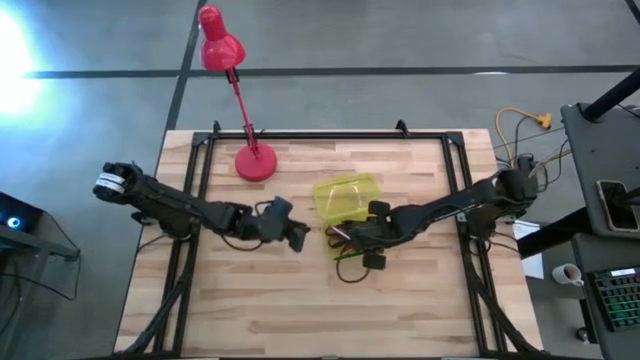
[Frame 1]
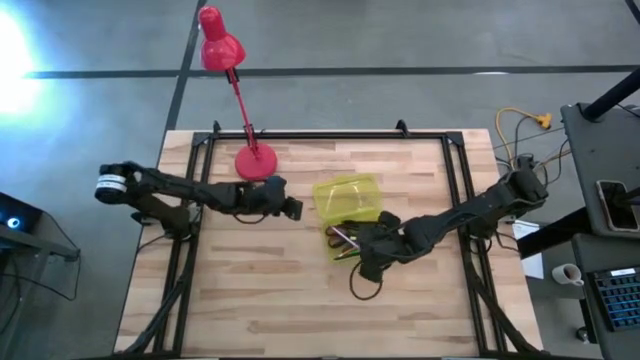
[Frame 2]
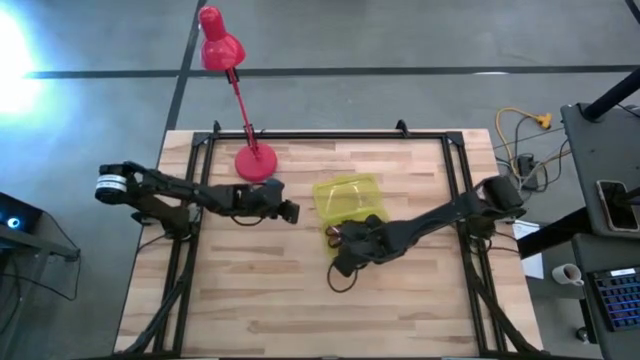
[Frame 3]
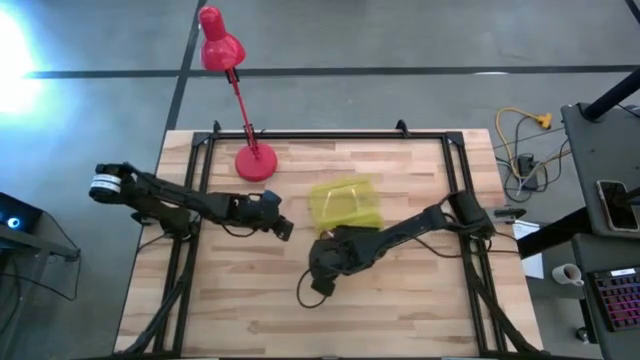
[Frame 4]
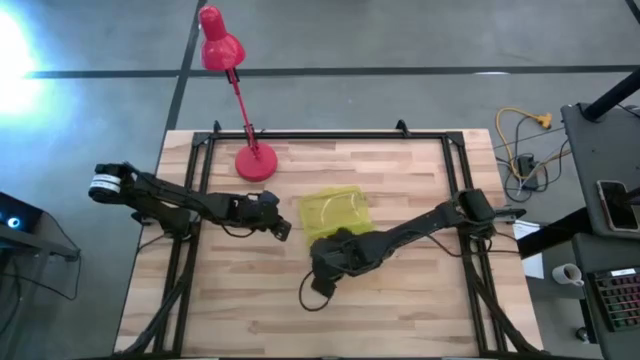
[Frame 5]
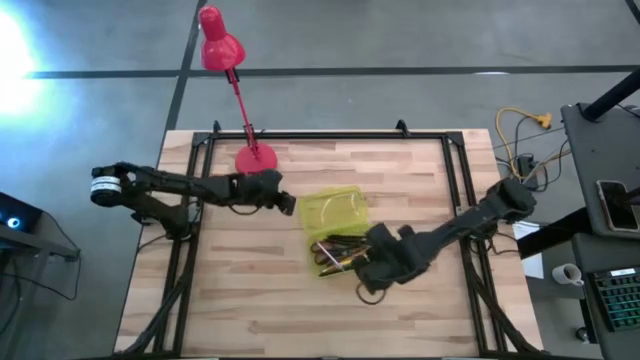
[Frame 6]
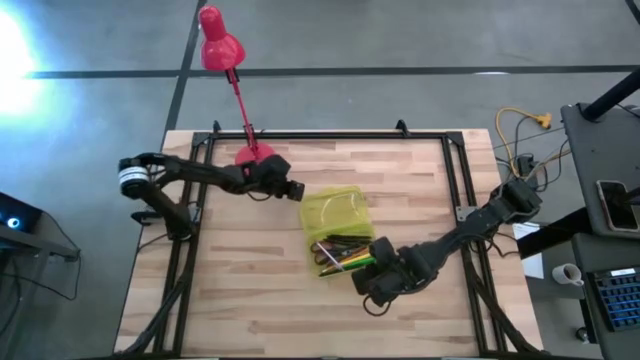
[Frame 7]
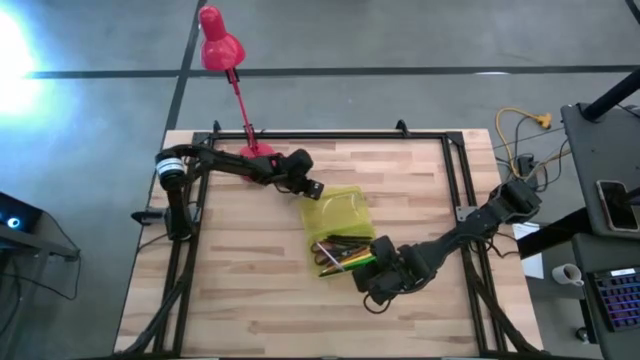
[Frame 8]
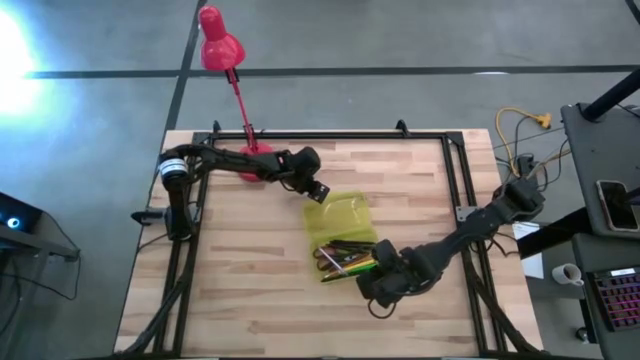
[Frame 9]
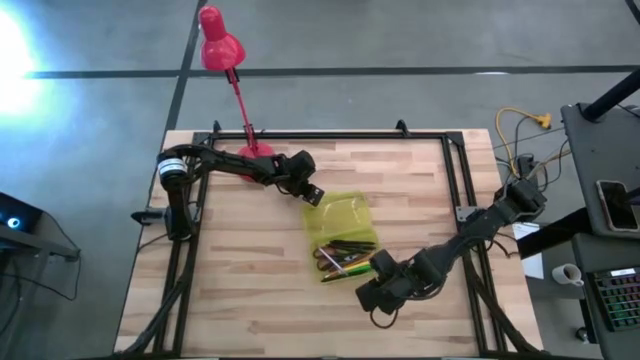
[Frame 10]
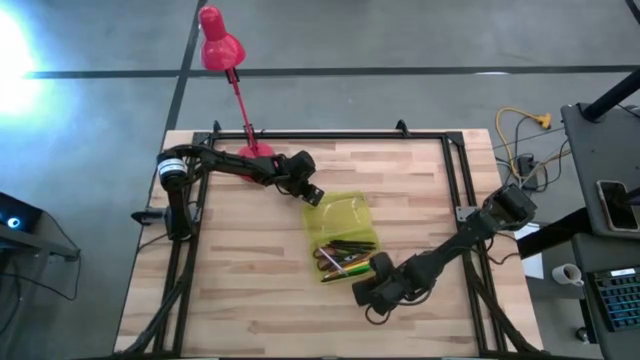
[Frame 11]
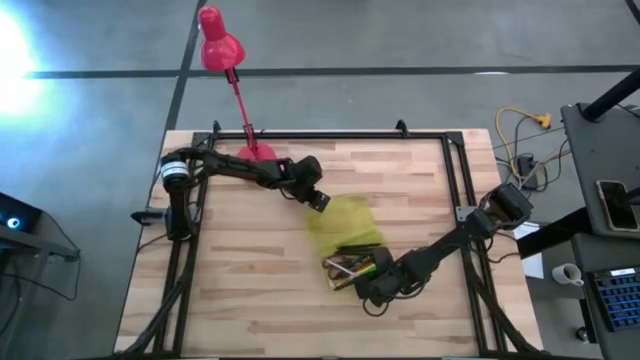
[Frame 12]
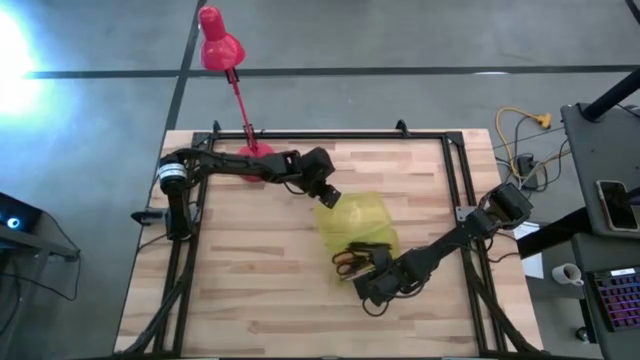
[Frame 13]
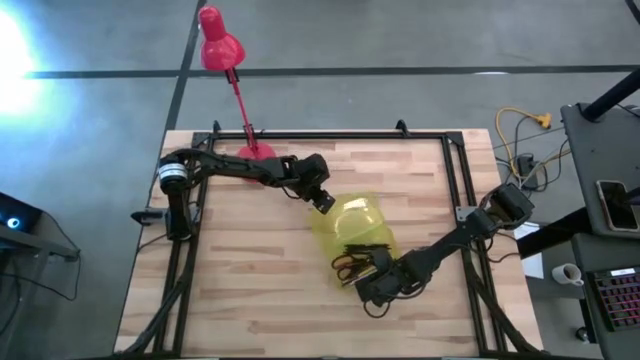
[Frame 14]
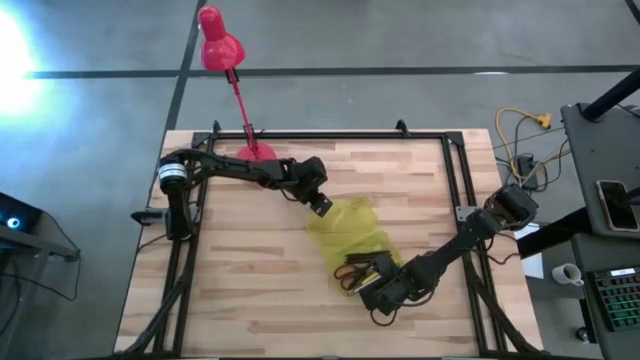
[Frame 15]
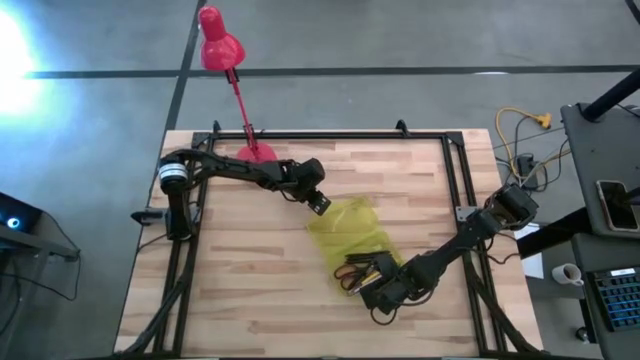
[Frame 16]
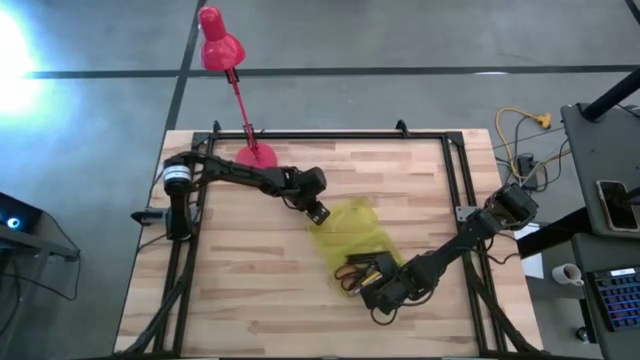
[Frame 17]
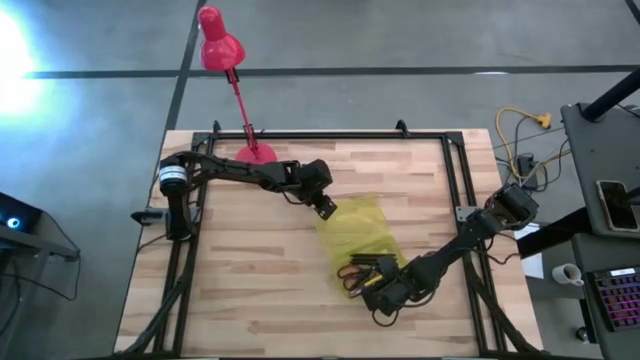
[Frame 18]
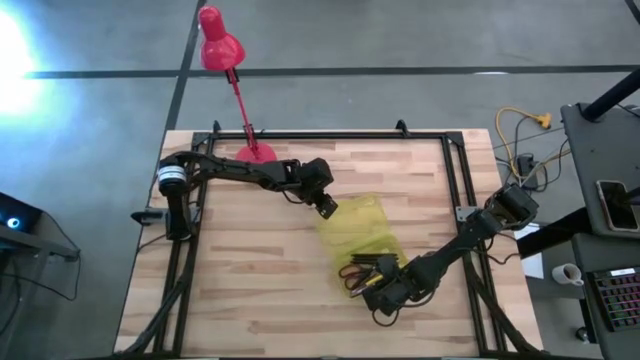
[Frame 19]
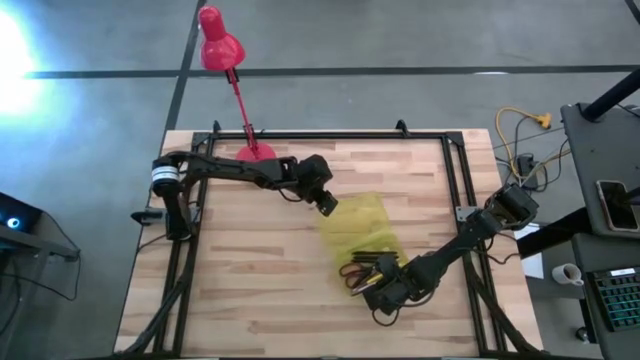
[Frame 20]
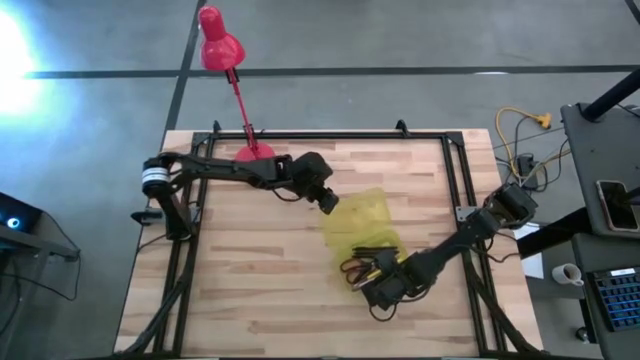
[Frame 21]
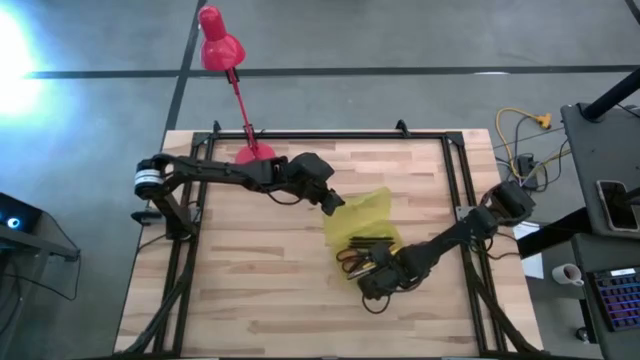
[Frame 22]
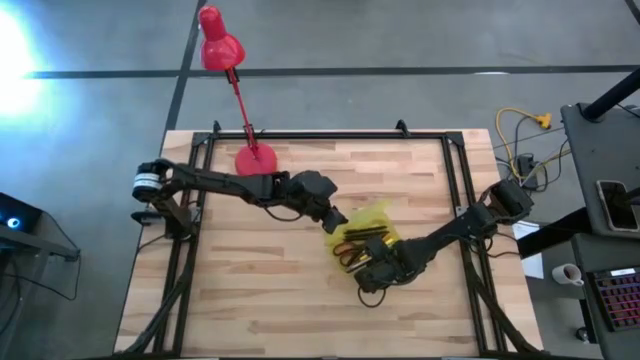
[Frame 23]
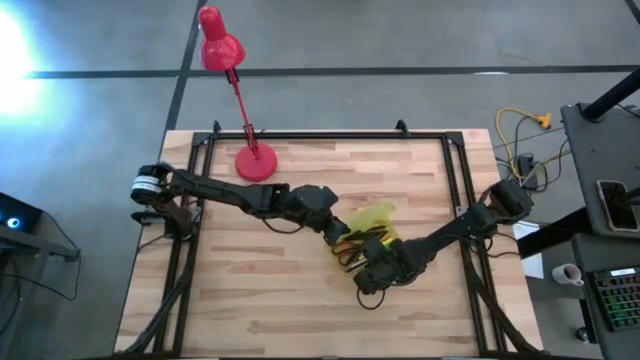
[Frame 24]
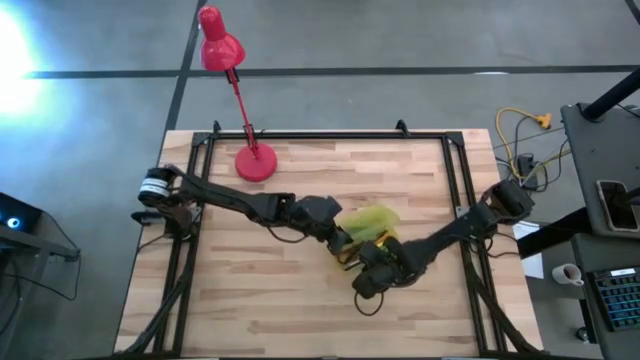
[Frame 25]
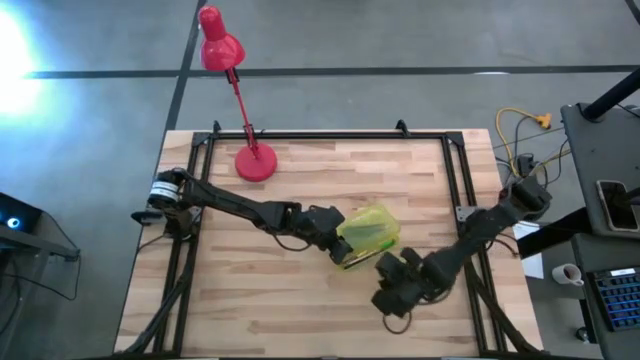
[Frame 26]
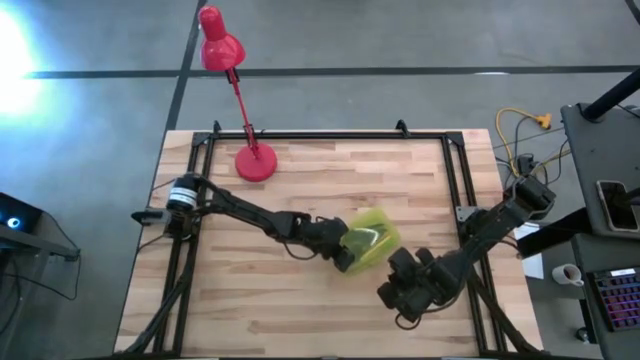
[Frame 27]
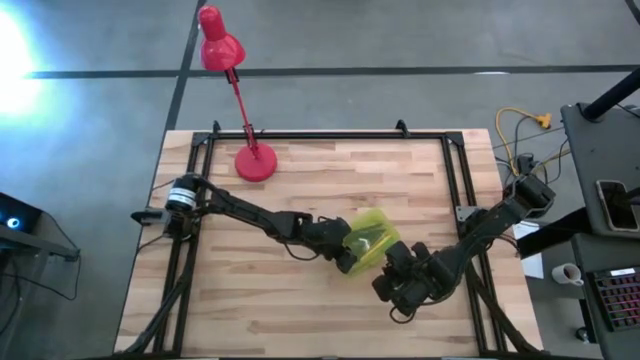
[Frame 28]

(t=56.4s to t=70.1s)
Task: Pick & place school supplies into a supply box
Close the yellow supply box

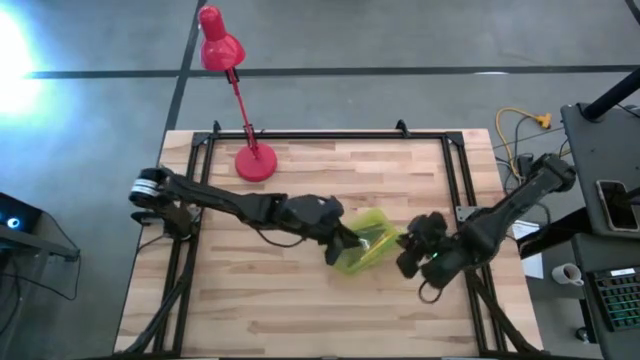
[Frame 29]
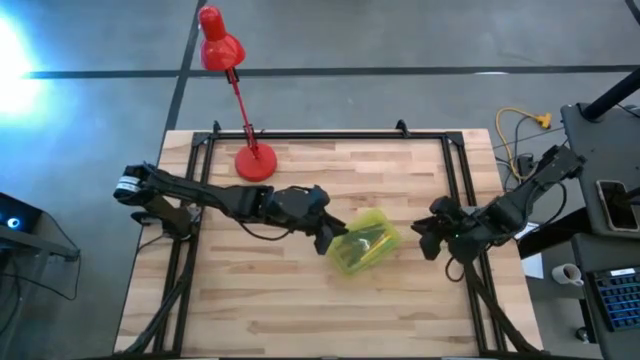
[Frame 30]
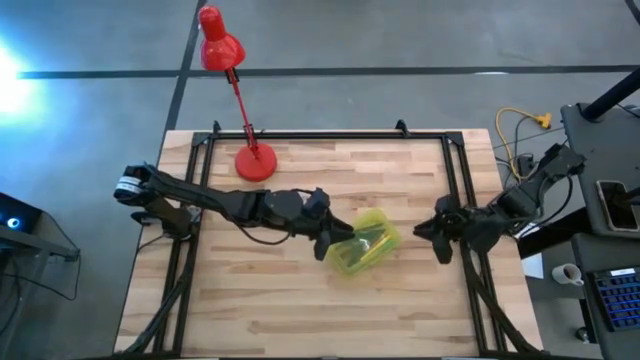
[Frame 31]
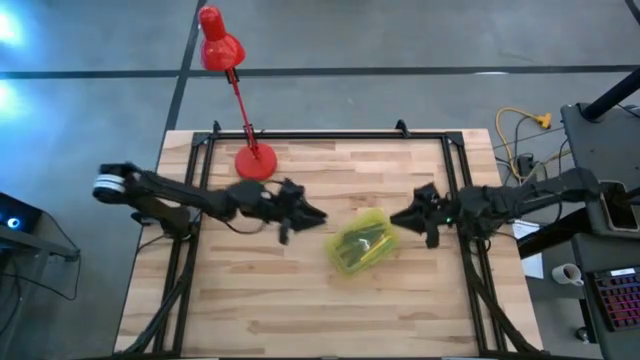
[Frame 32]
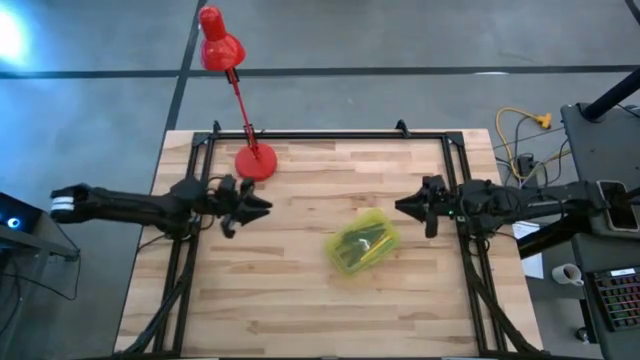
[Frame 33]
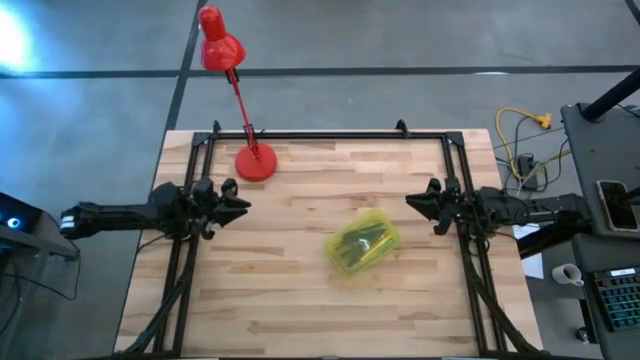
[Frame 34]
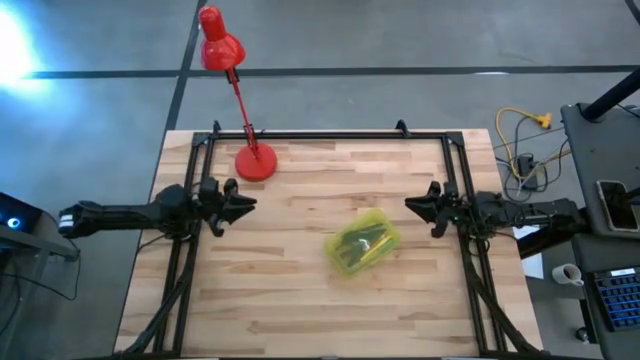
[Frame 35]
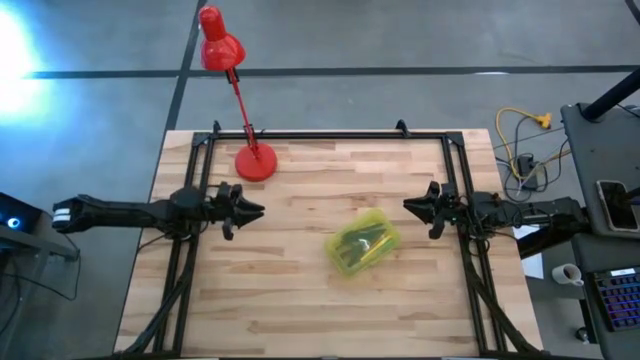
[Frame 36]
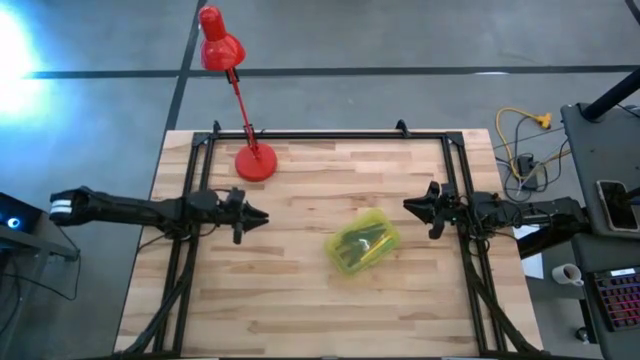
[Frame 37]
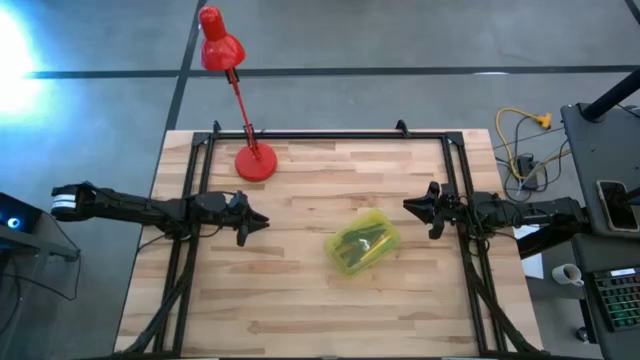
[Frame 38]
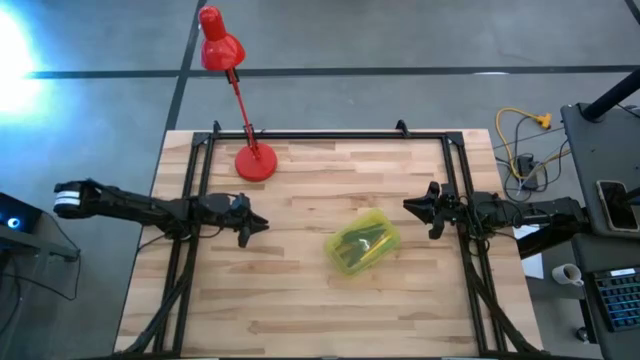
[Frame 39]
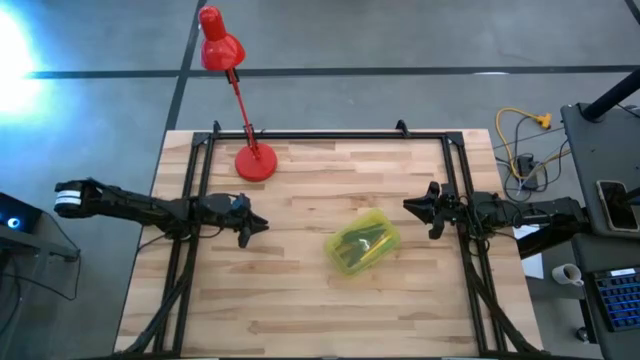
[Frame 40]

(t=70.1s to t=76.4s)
Return to Home Position

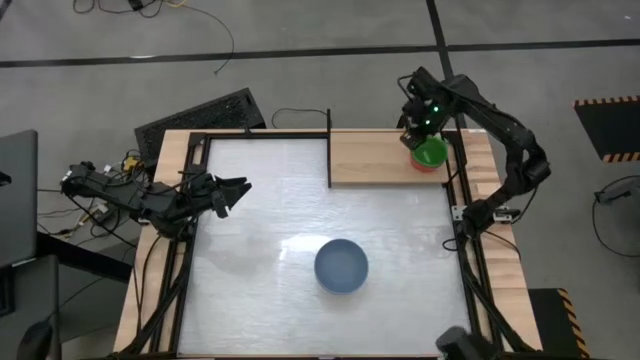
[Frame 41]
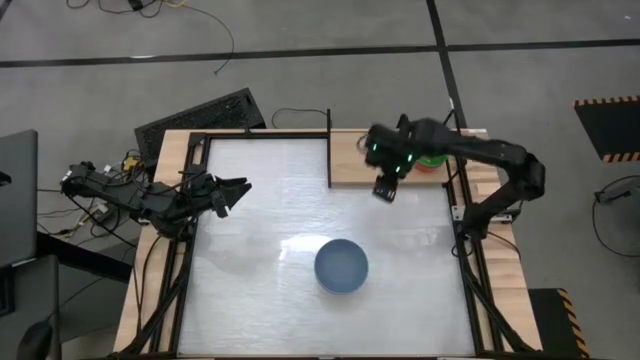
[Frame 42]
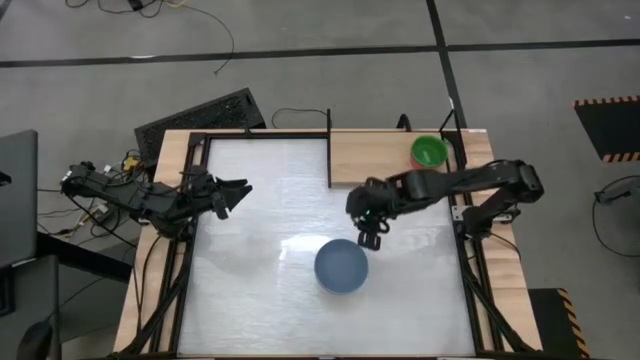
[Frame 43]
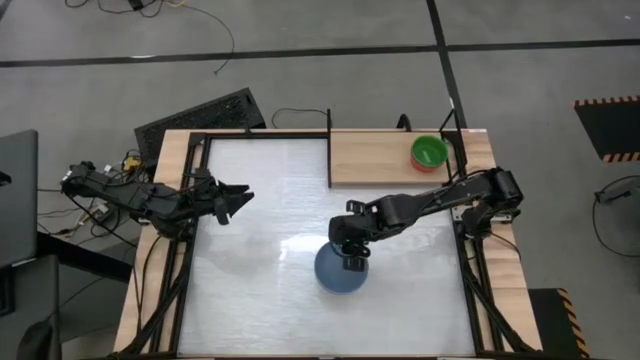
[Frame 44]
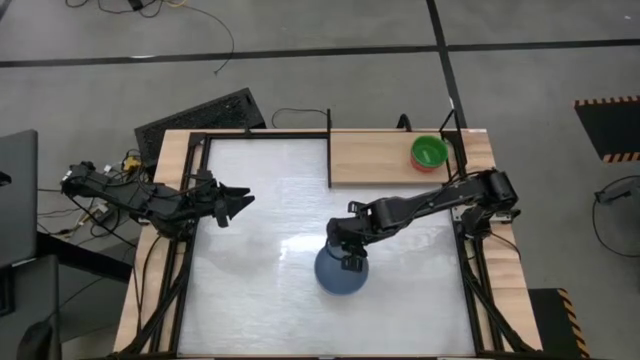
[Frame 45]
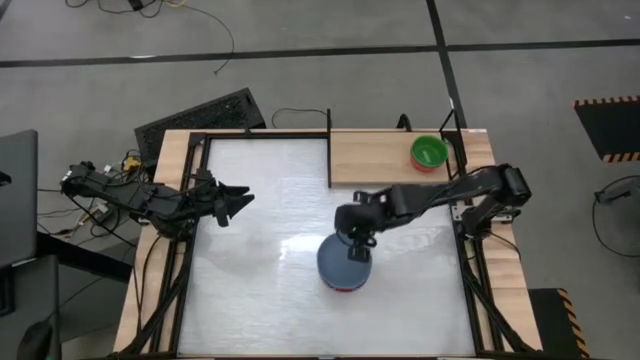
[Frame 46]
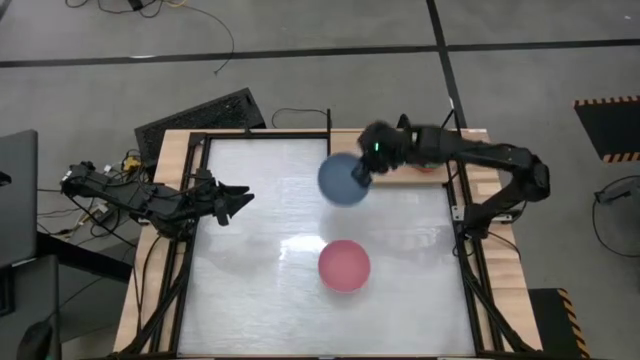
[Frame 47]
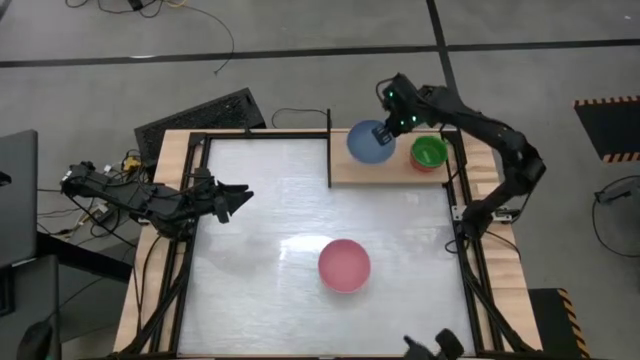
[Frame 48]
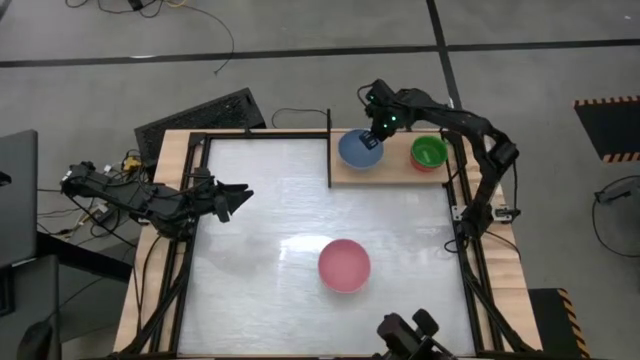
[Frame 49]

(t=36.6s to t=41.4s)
Task: Place and stack bowls onto a shelf
Put the blue bowl on the shelf
